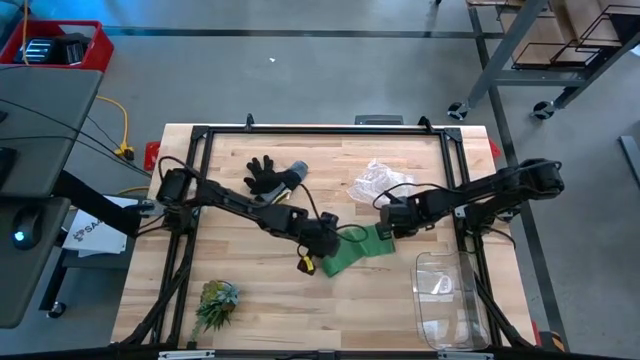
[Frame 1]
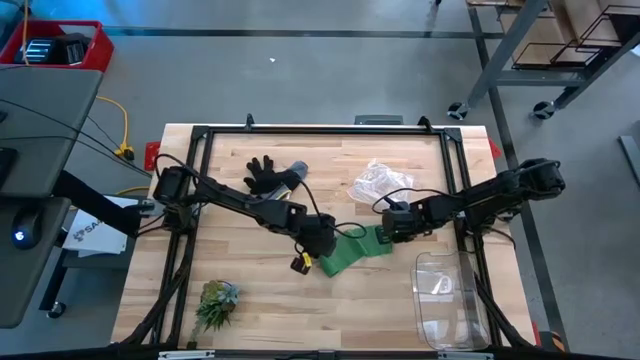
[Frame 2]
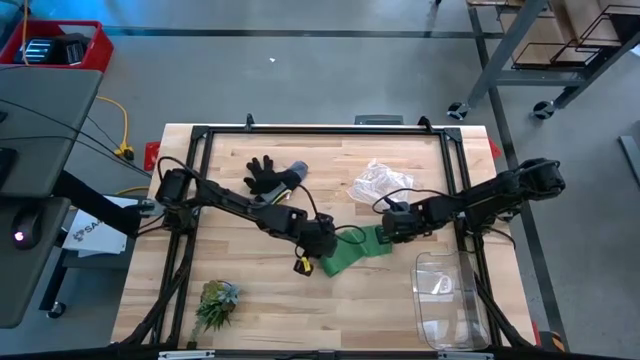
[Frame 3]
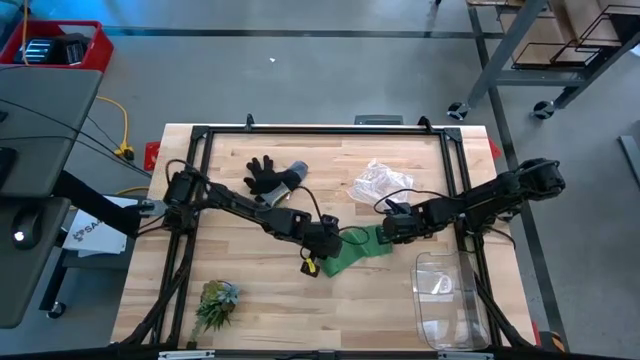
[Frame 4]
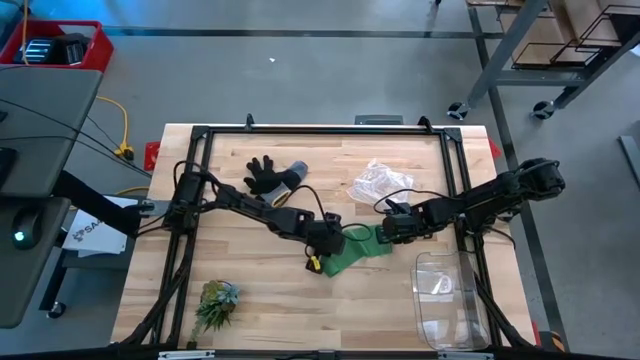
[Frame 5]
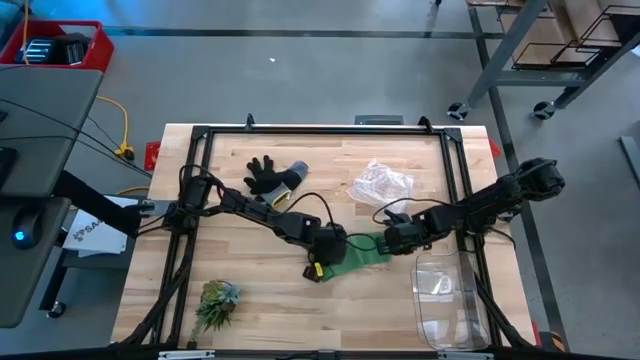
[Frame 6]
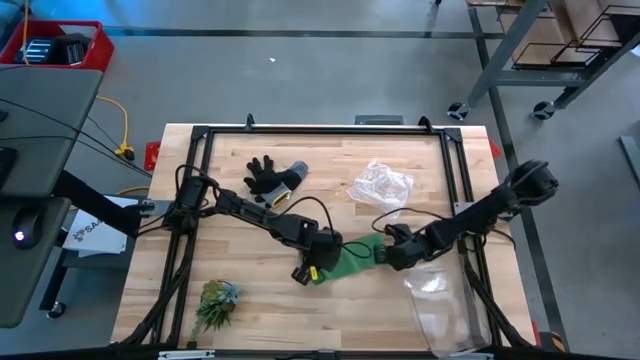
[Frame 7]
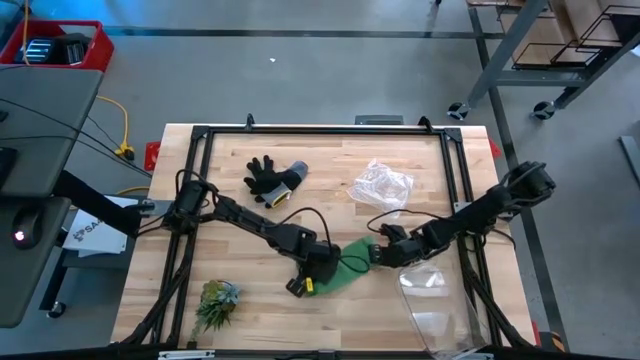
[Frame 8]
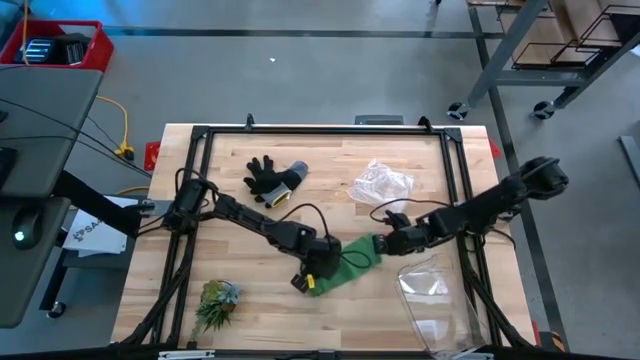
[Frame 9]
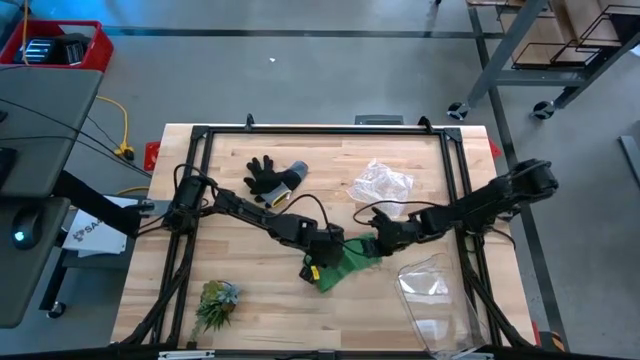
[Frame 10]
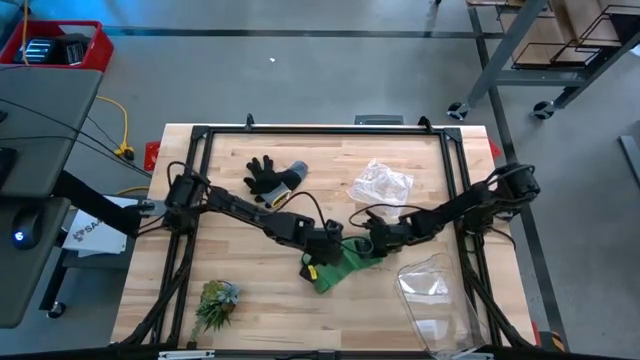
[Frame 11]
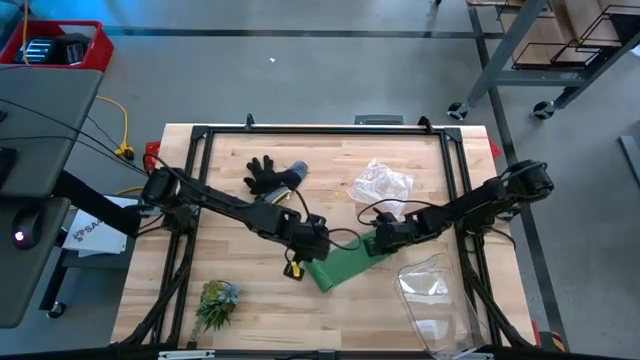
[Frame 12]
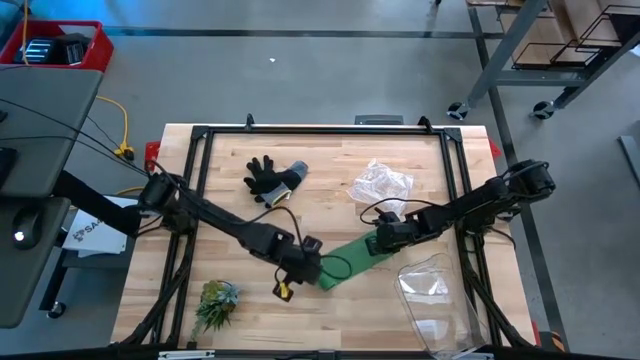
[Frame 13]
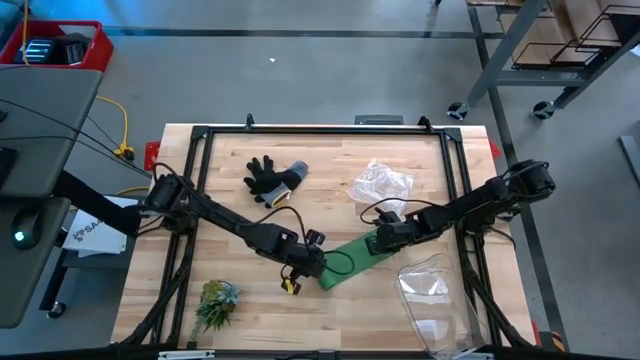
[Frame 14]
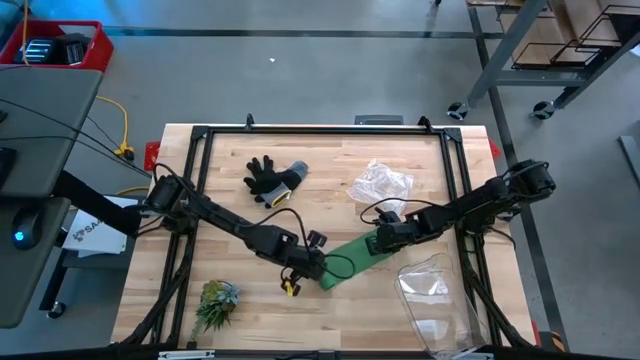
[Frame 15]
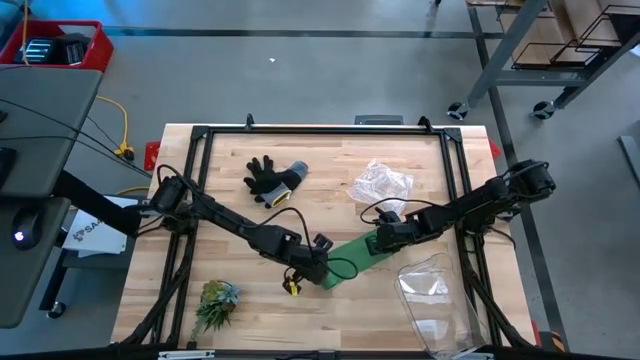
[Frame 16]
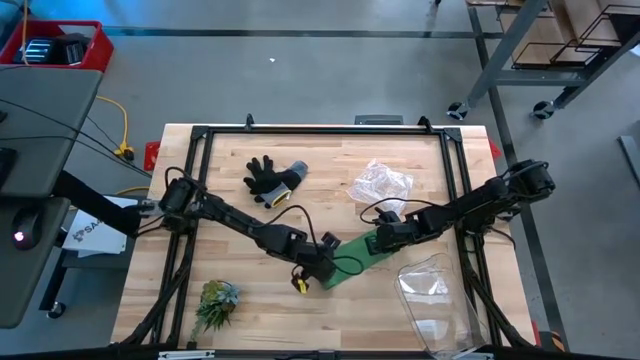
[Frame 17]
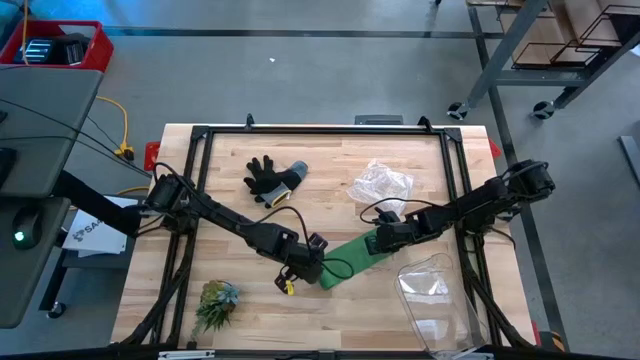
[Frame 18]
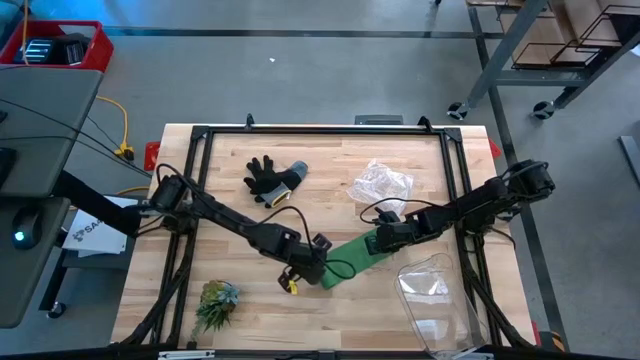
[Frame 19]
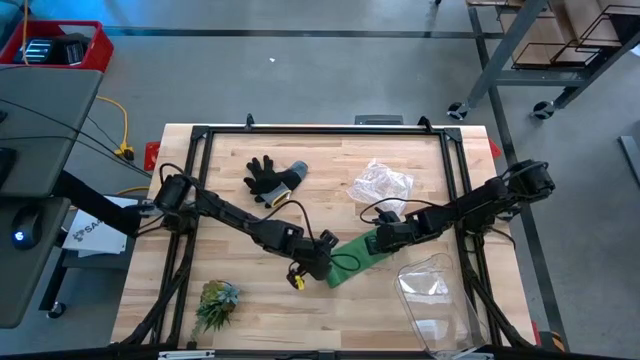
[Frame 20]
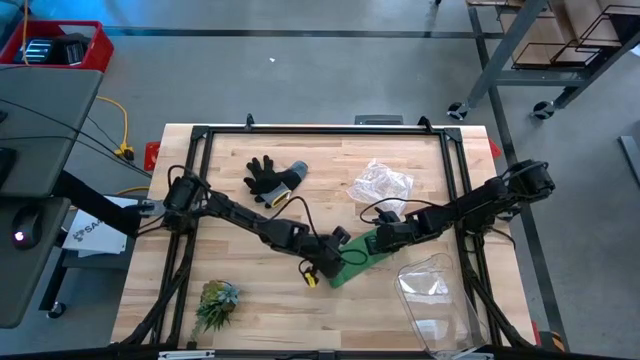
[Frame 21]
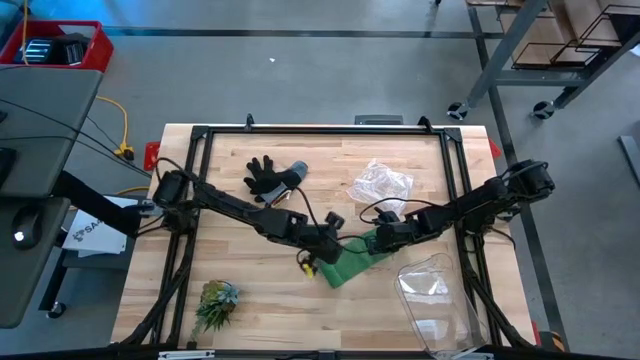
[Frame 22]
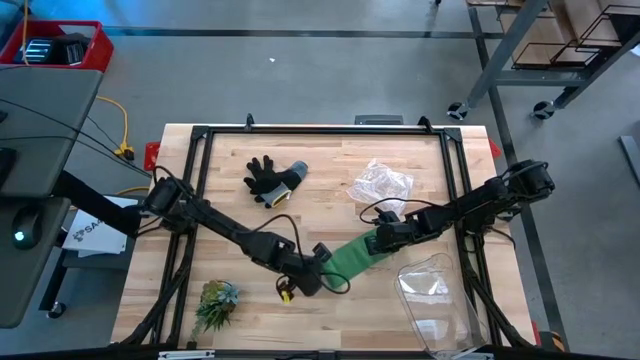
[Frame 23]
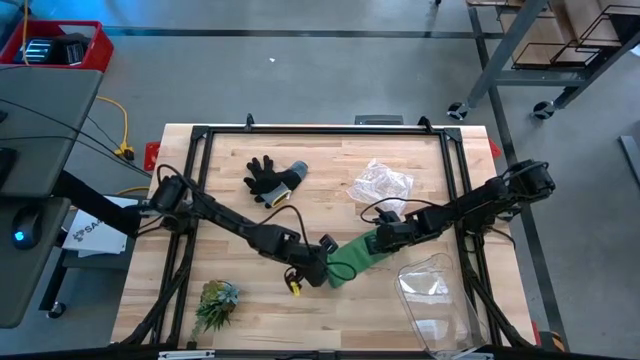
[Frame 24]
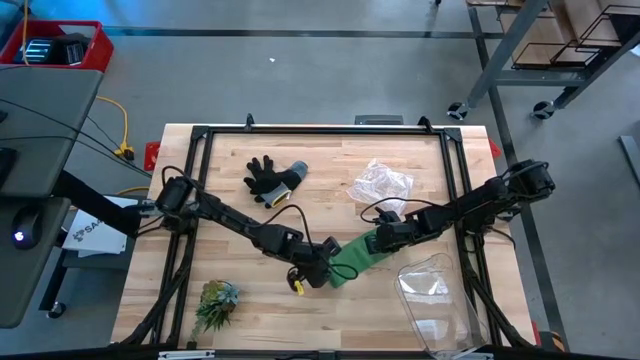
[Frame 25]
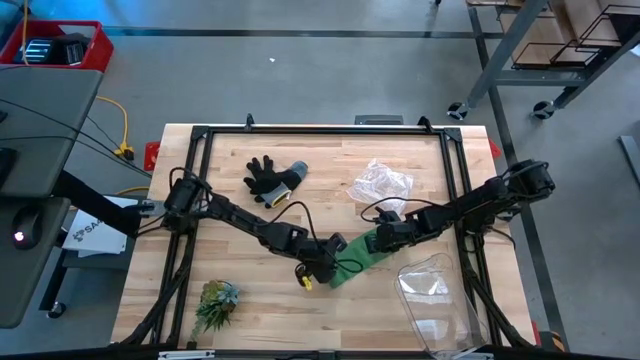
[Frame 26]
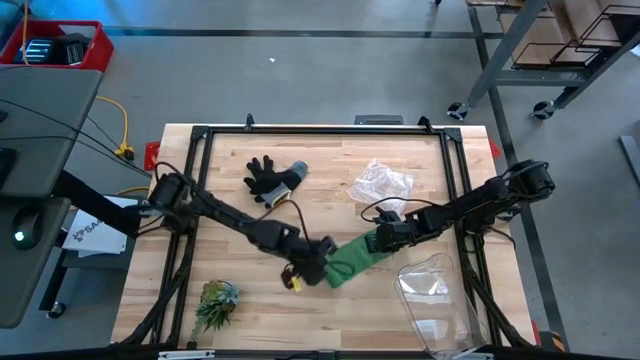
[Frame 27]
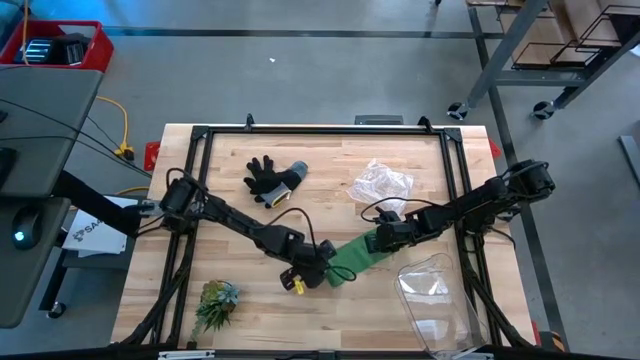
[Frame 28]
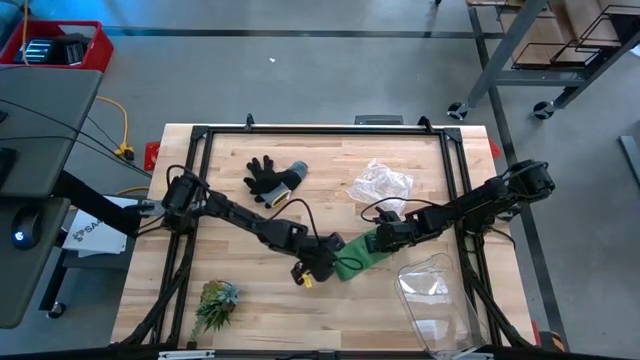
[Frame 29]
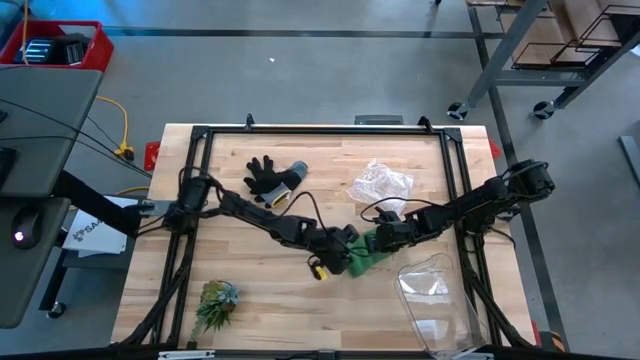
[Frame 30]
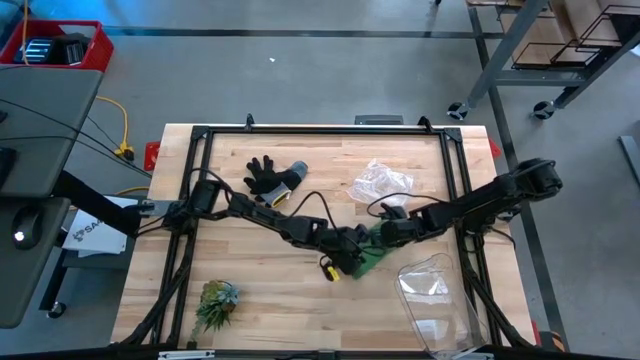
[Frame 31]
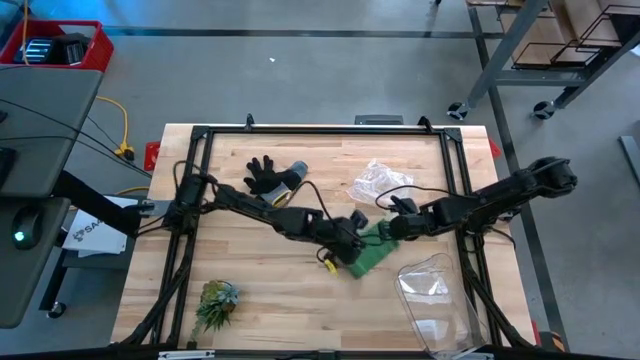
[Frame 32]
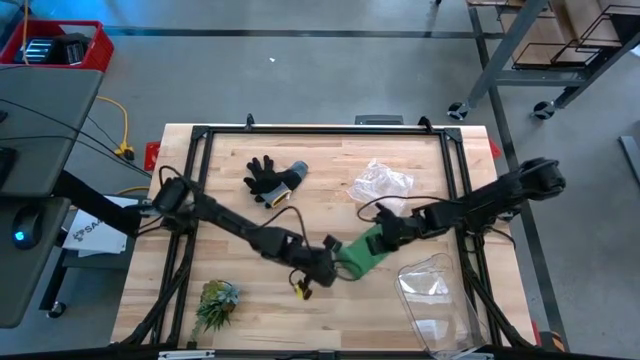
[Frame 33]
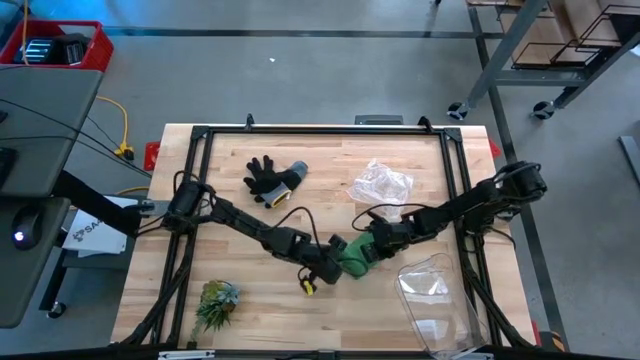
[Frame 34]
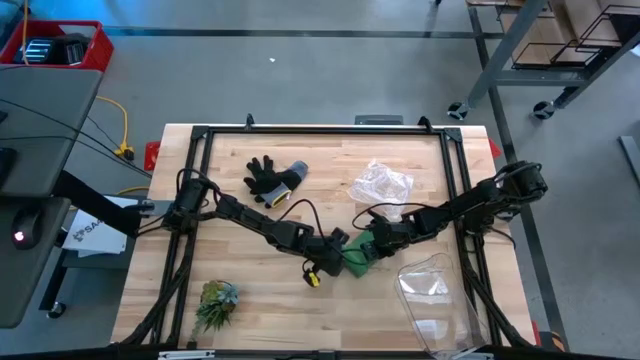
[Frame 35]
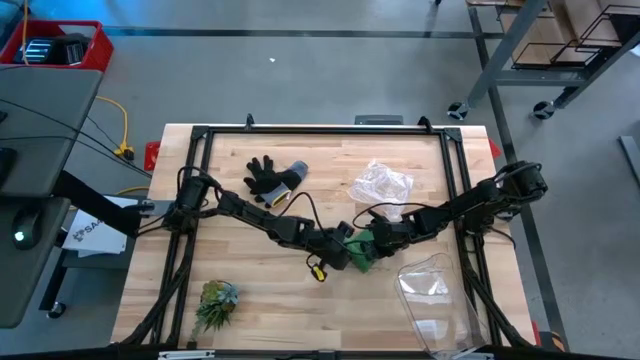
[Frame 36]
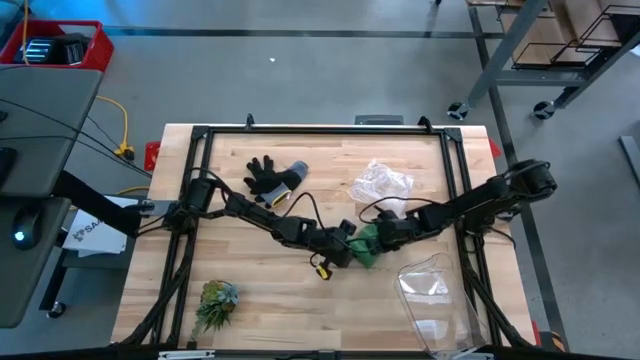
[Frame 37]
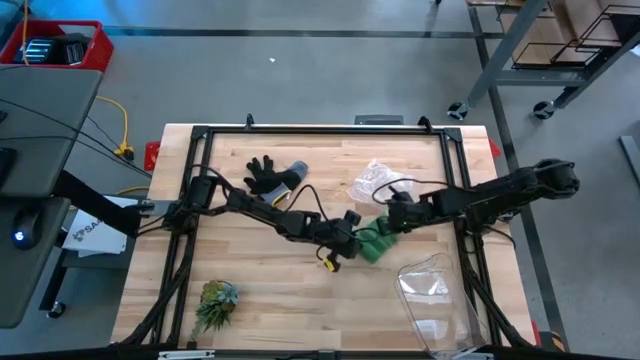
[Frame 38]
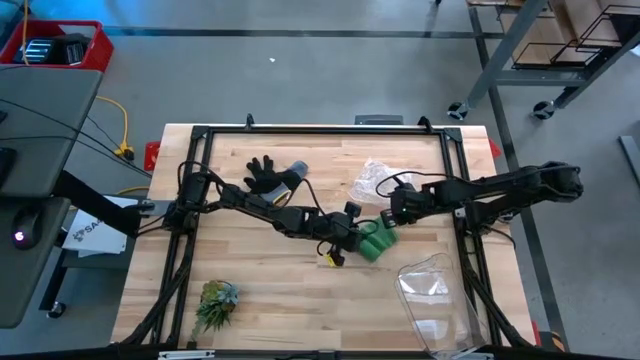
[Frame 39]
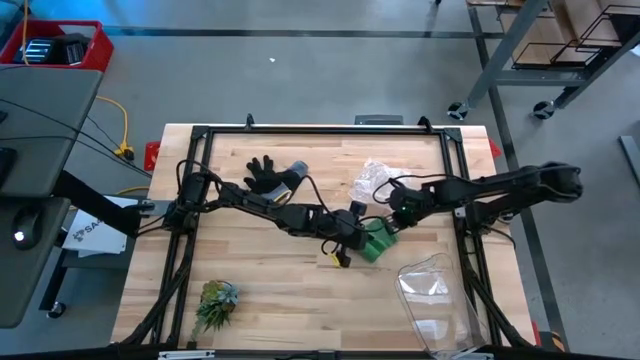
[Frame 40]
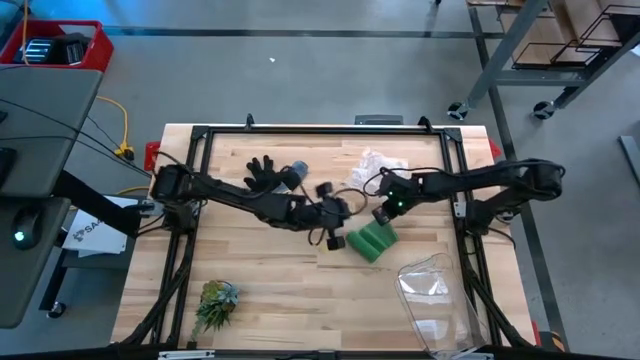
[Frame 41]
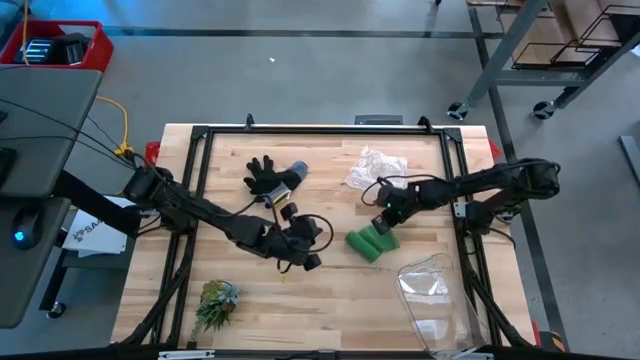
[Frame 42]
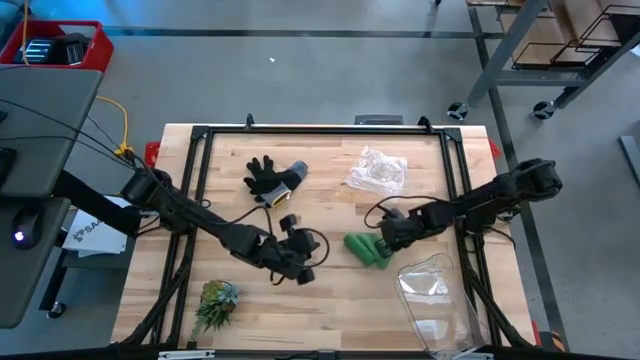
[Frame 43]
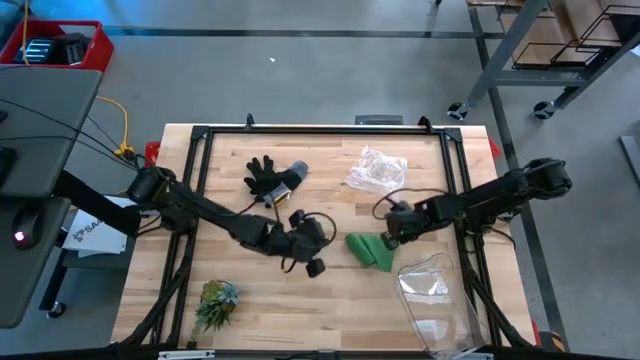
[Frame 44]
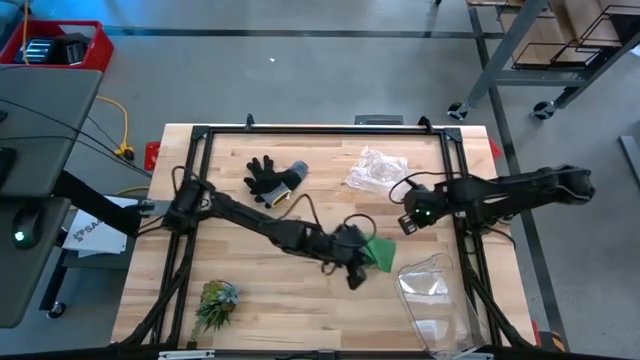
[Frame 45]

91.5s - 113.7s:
Task: Roll bandage
Roll the green bandage
